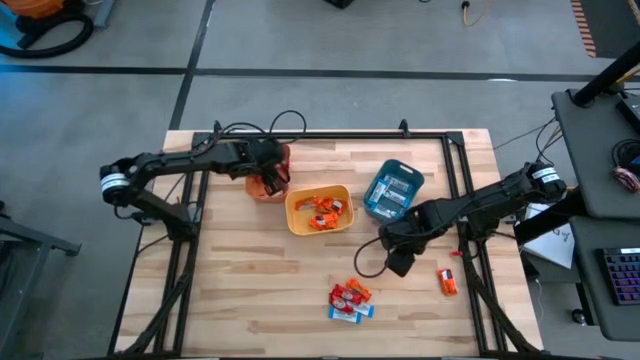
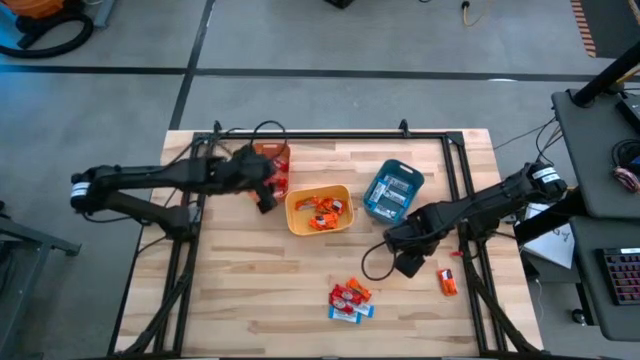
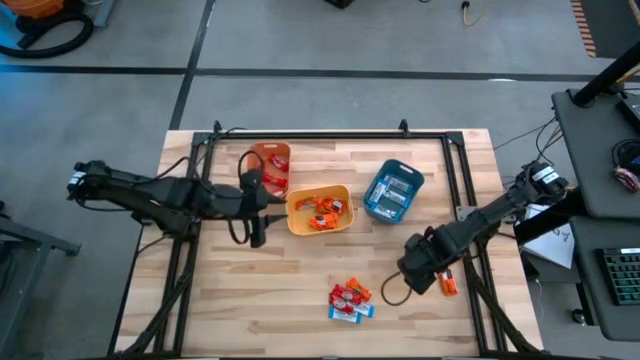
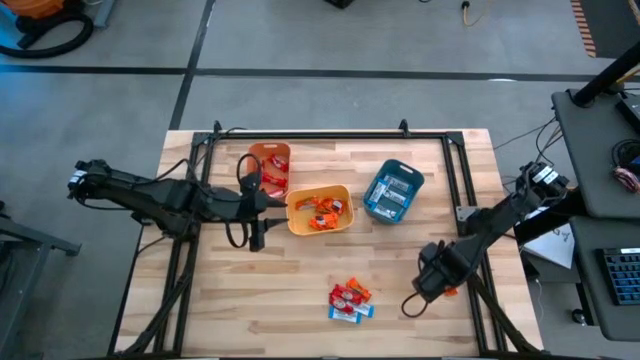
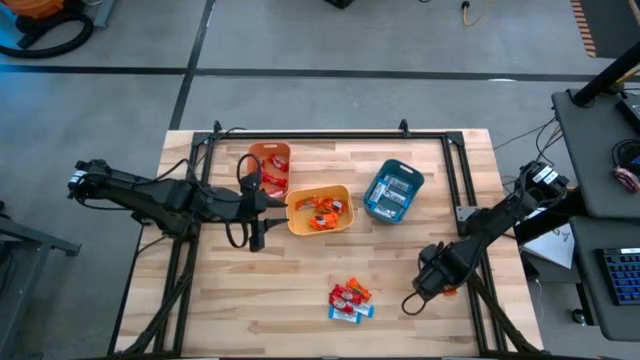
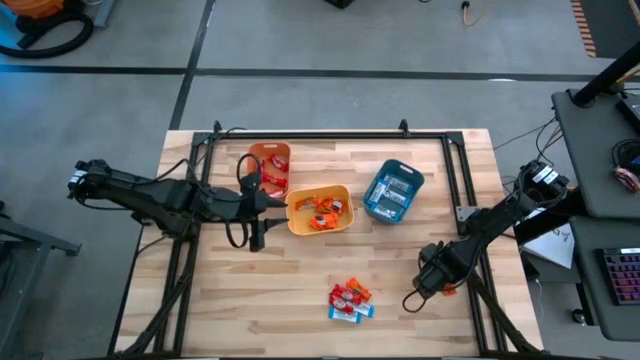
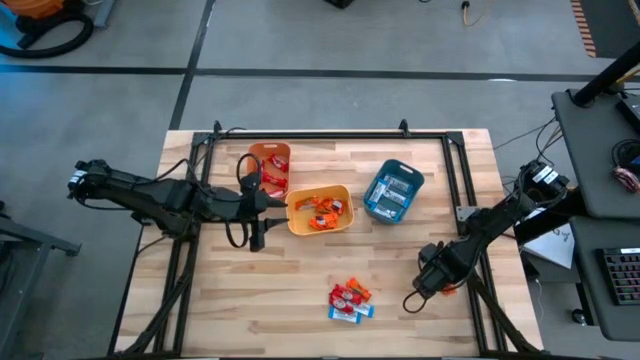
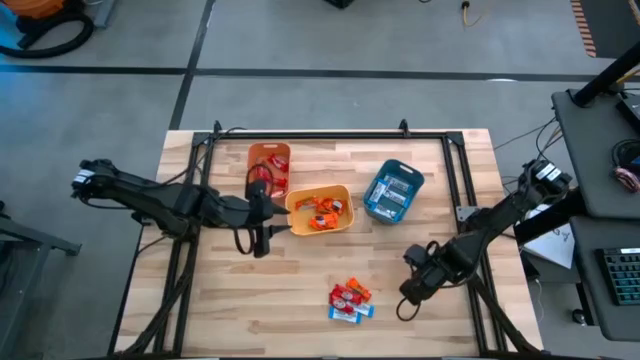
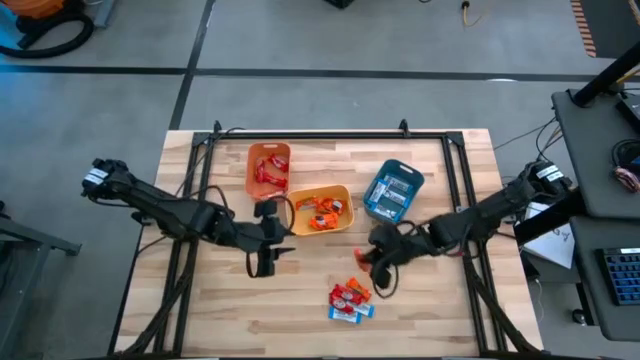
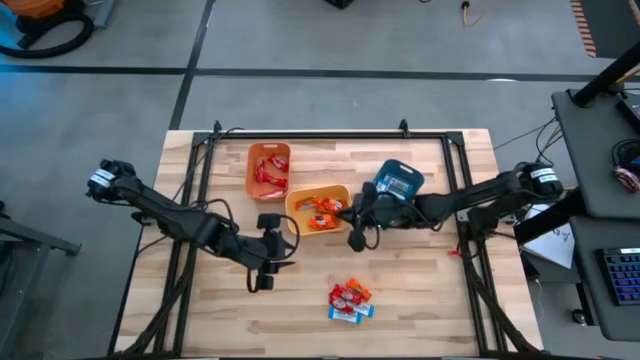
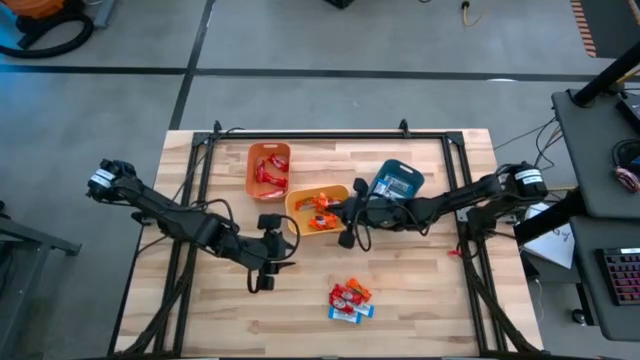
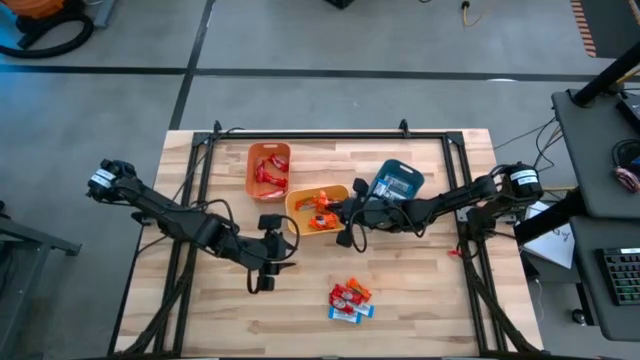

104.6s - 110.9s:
Task: Sort candy
Put the orange chocolate into the yellow bin

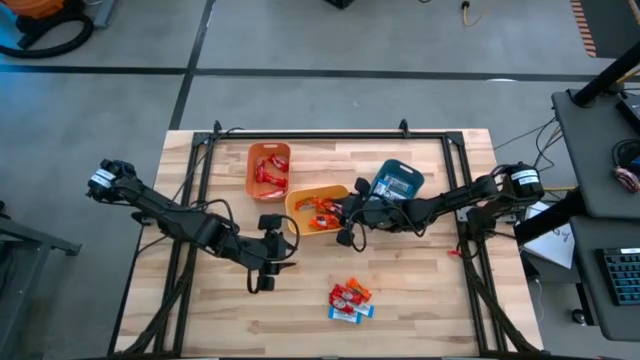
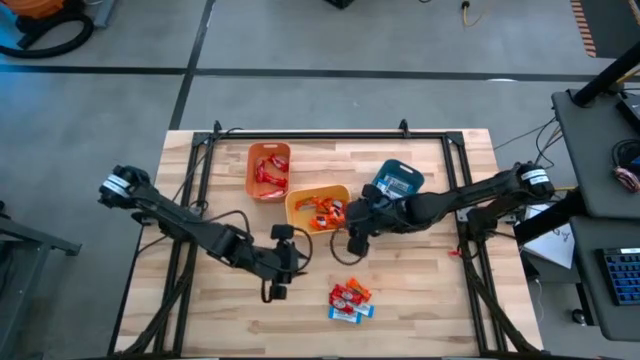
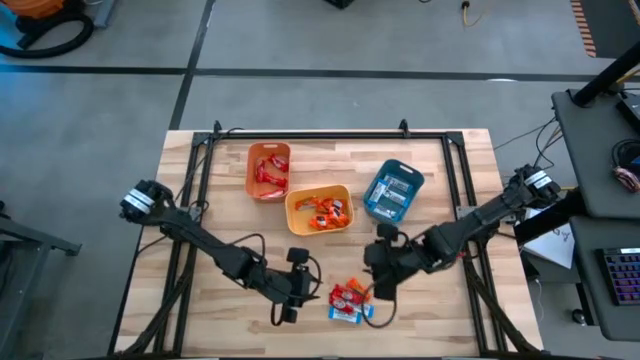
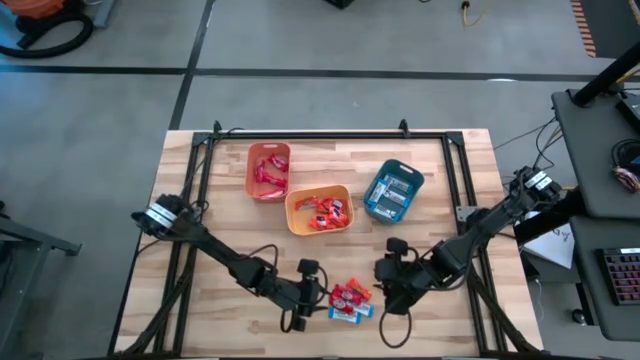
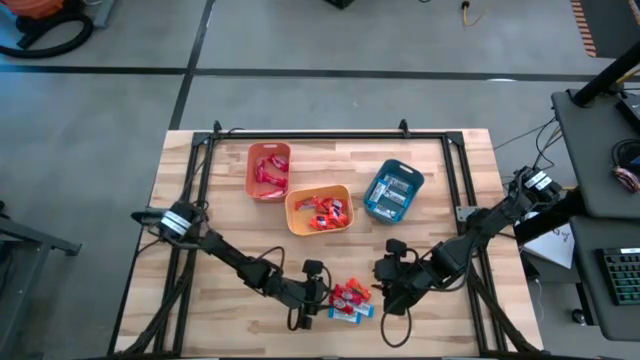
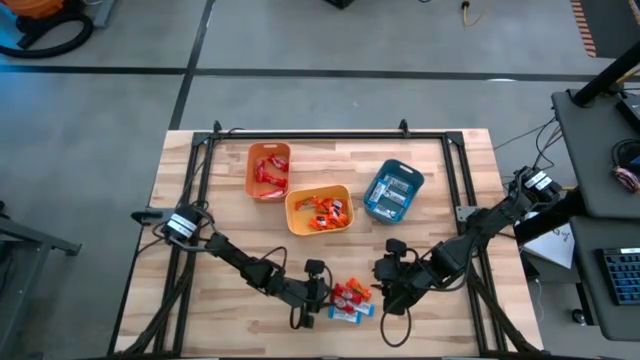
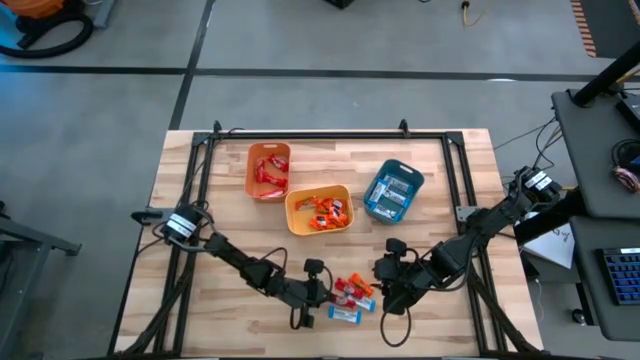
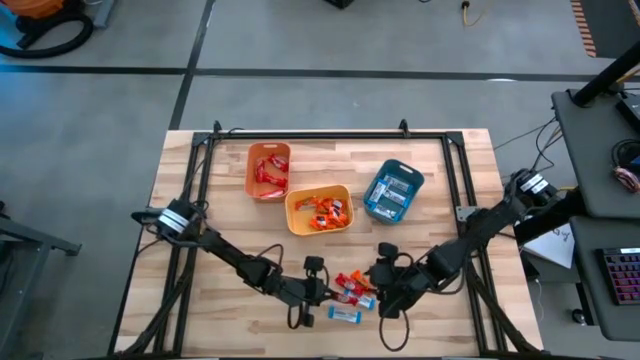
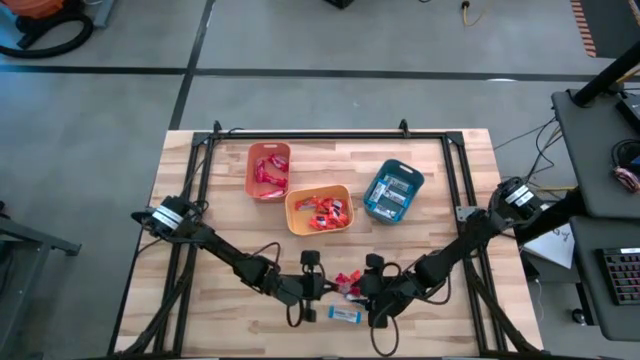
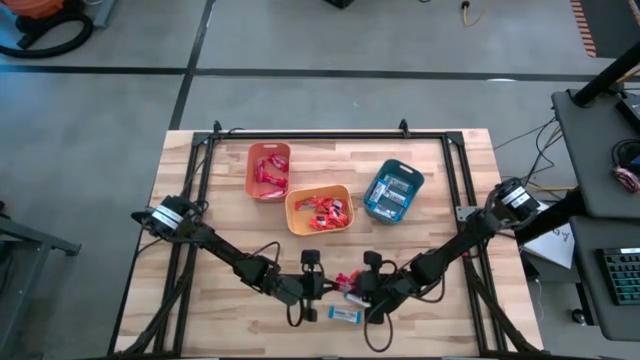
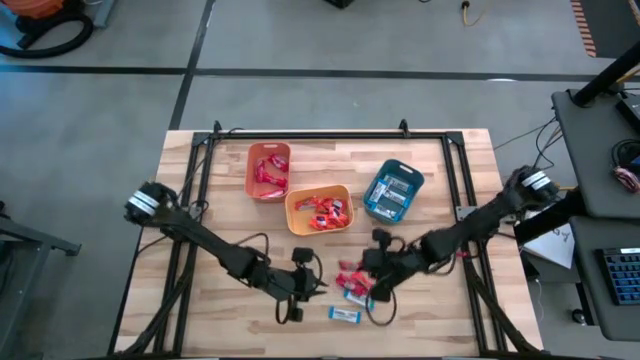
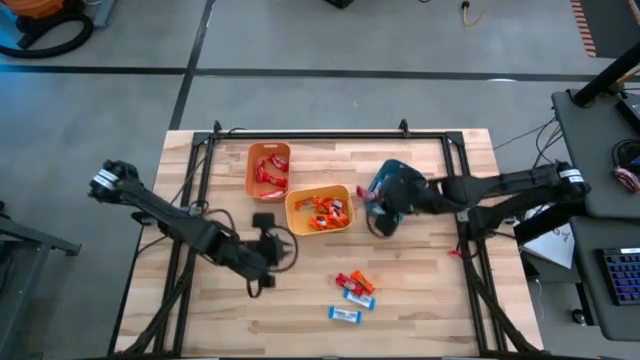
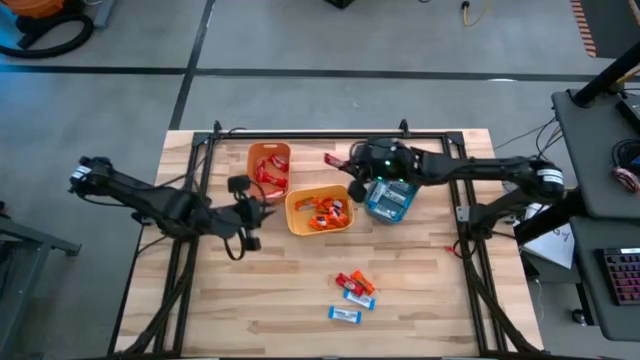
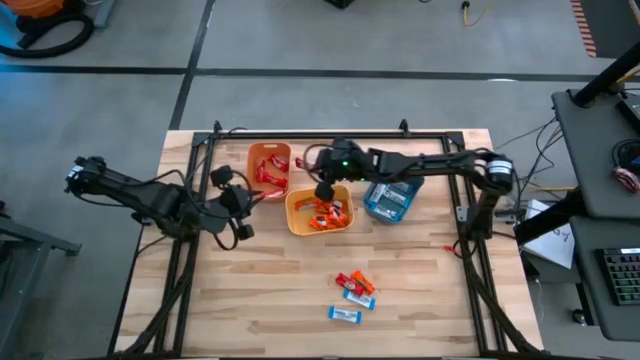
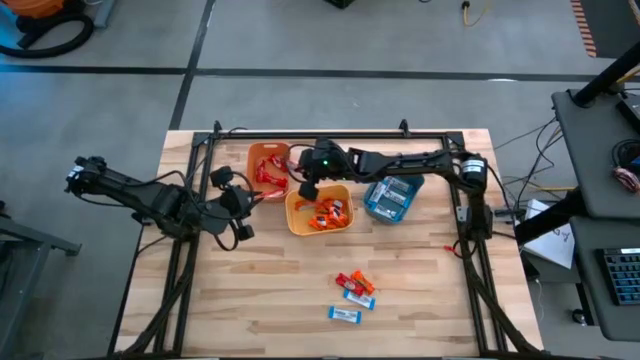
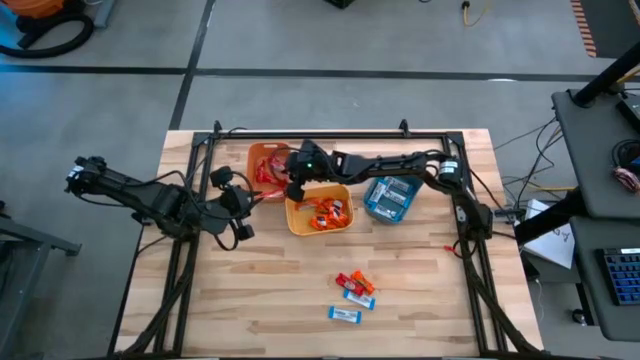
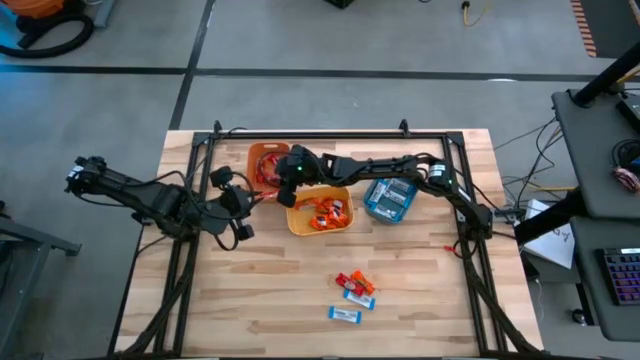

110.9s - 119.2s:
Put the red chocolate into the orange bin

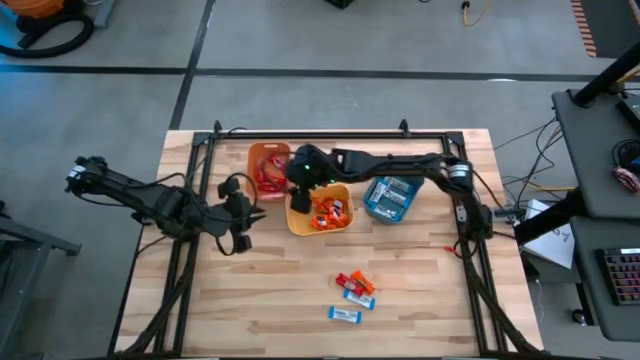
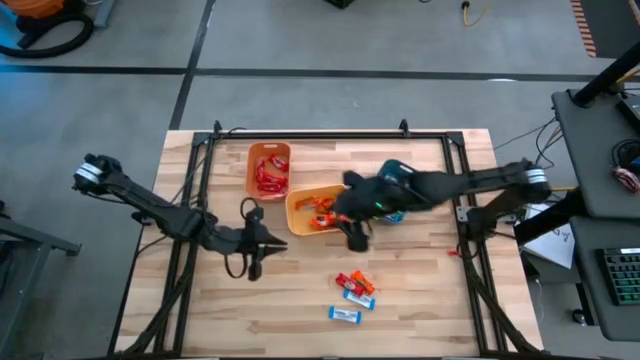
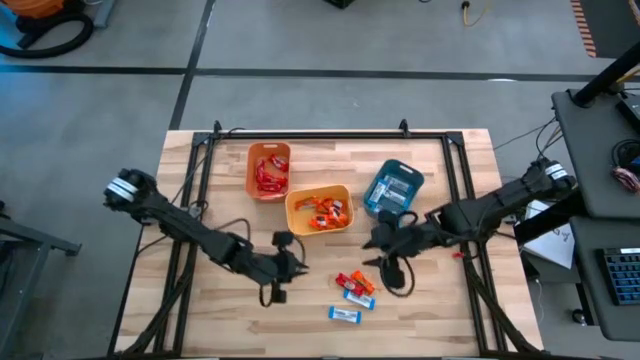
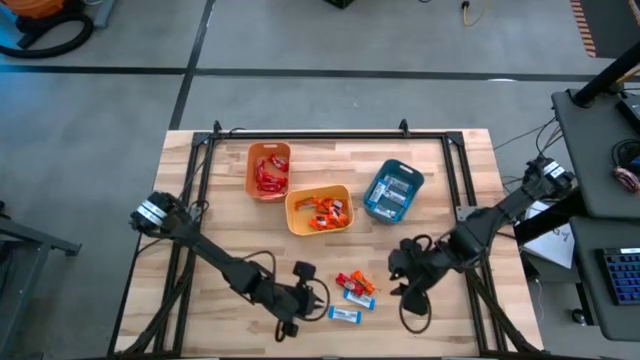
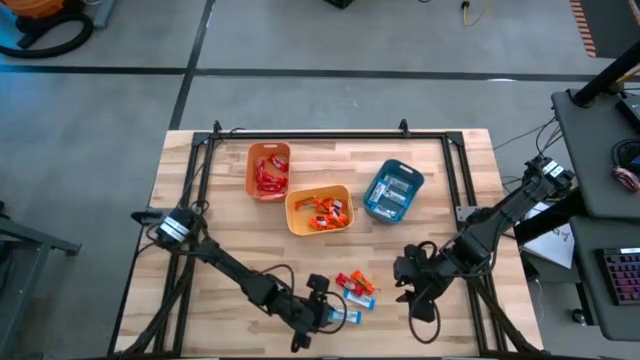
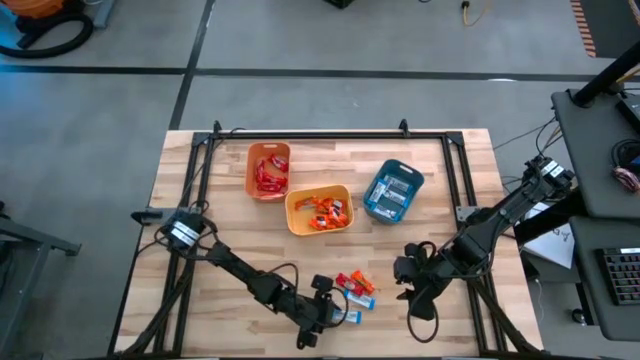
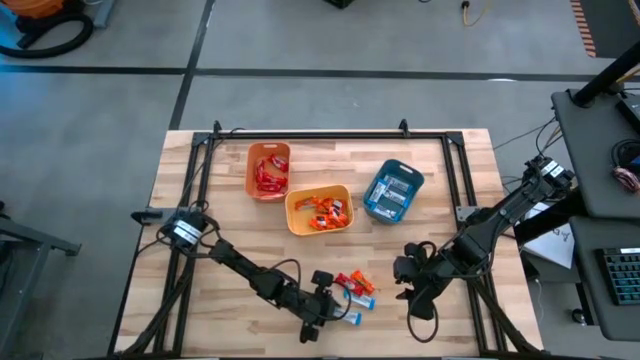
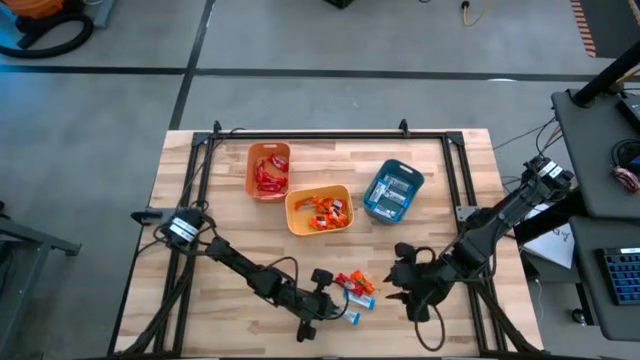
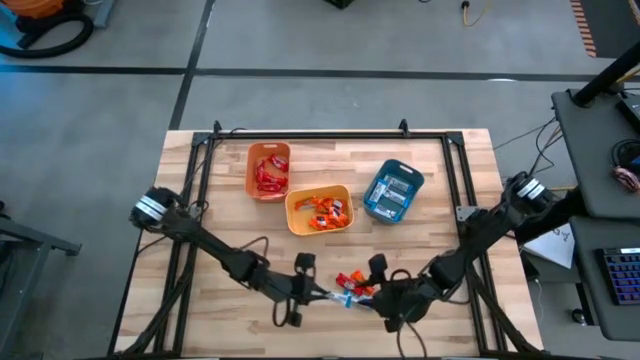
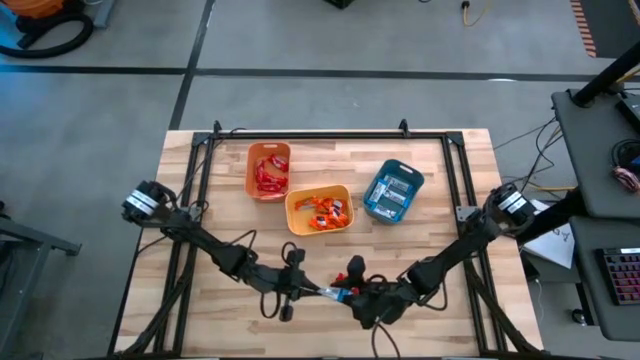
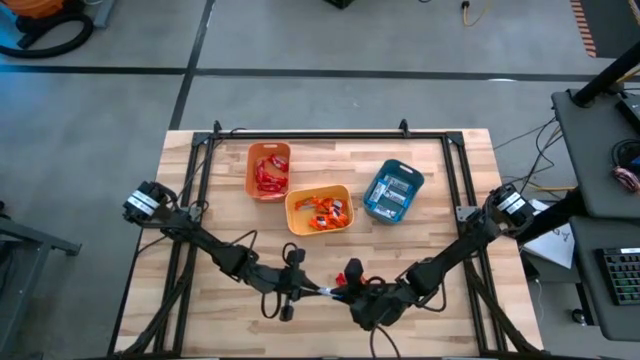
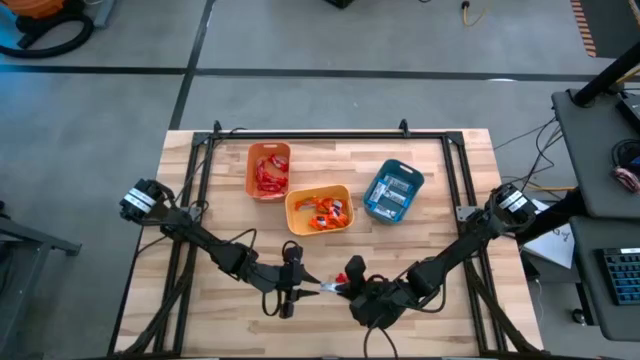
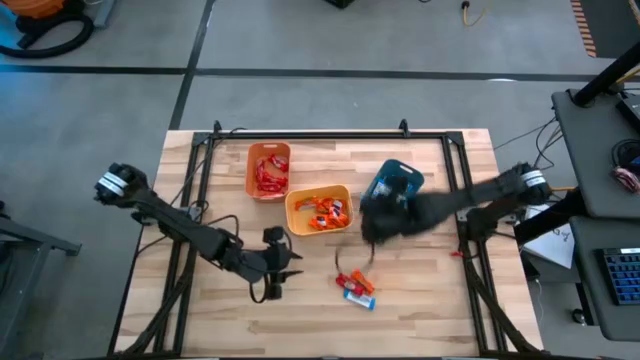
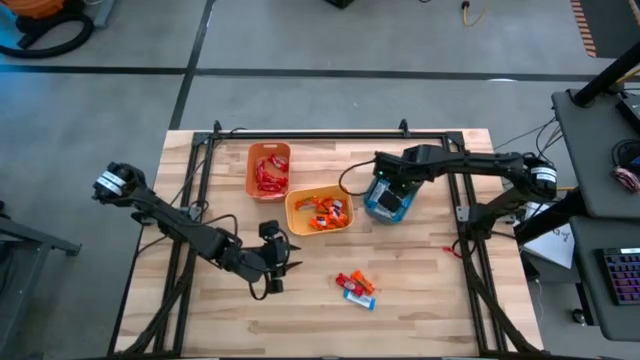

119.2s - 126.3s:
Put the white chocolate into the blue bin

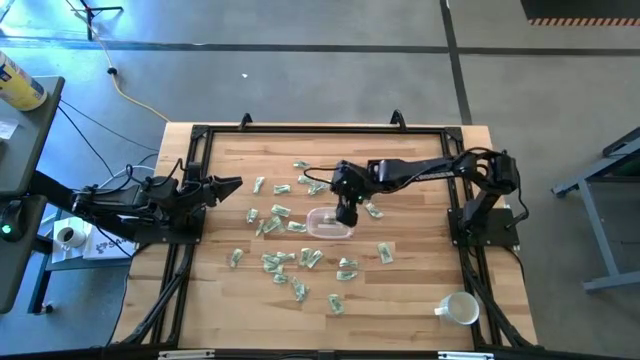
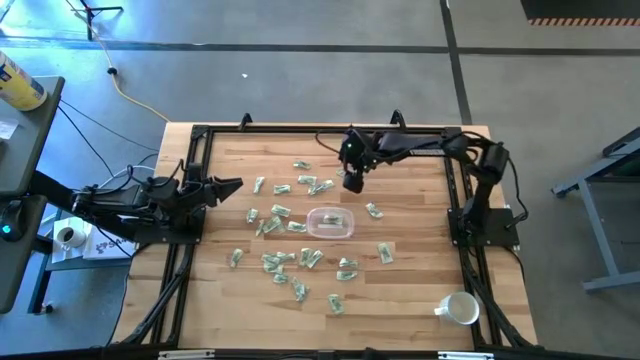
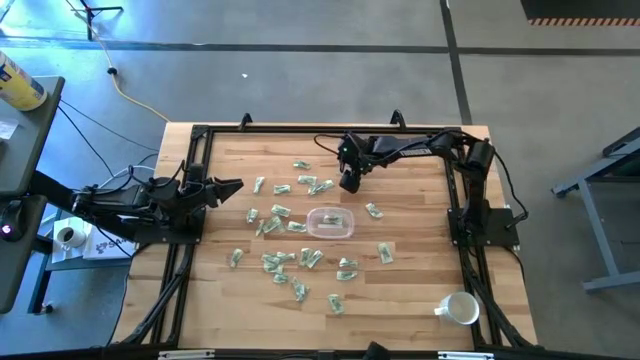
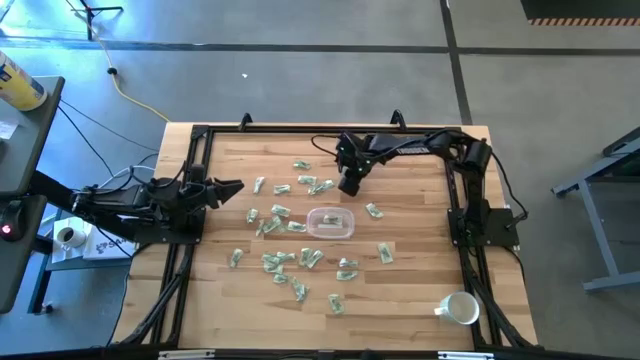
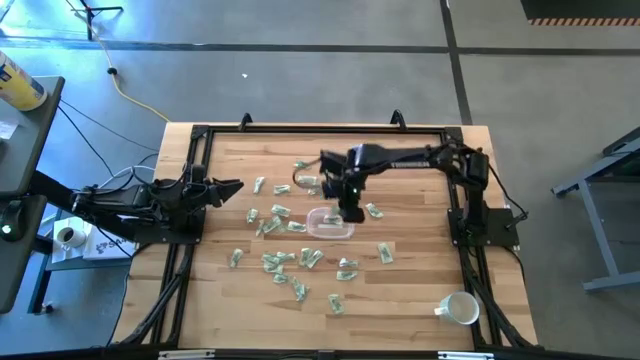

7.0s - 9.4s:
Task: Pick and place Stevia / Truvia into bins
Put the stevia packet into the transparent container
